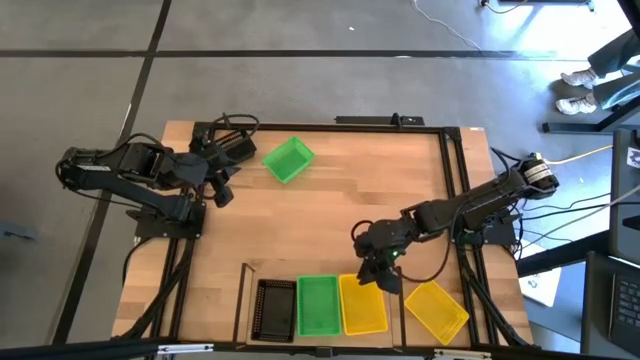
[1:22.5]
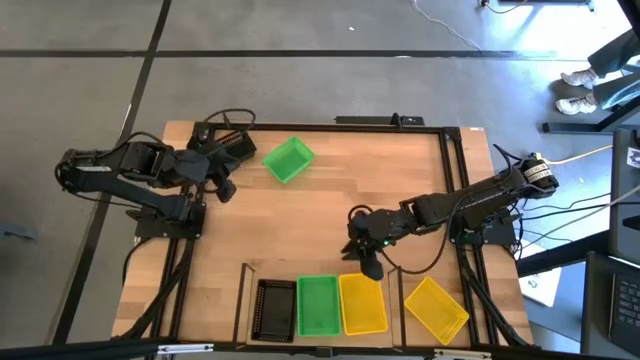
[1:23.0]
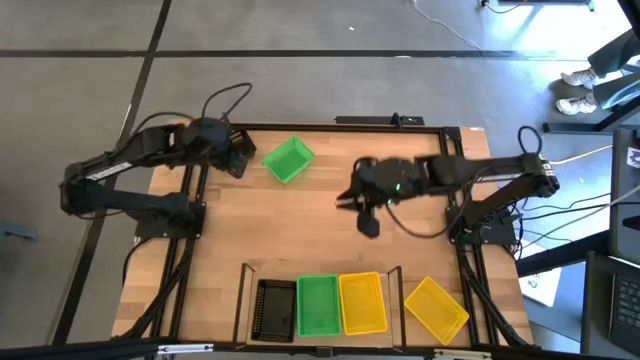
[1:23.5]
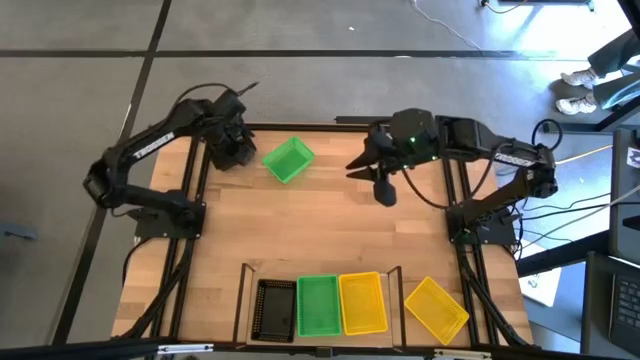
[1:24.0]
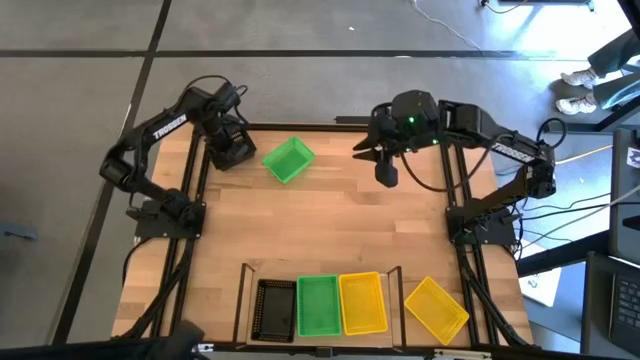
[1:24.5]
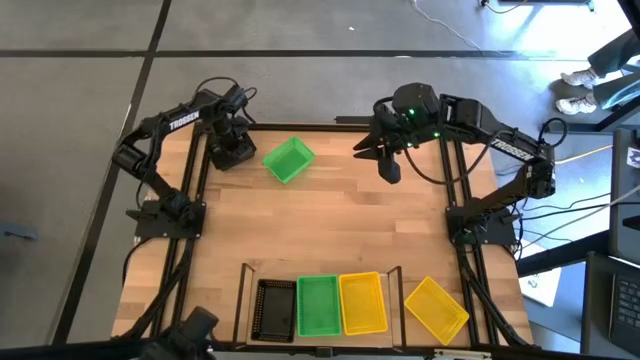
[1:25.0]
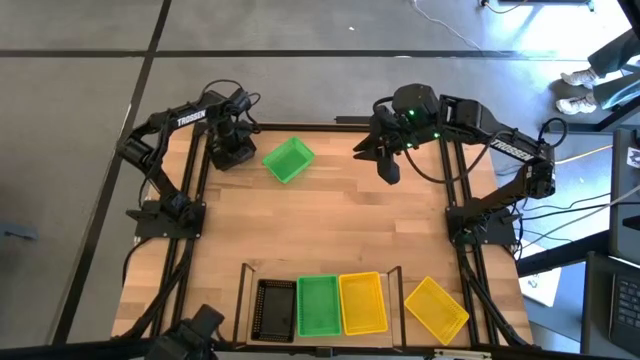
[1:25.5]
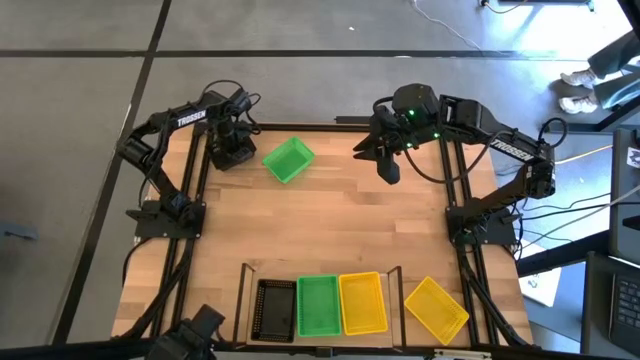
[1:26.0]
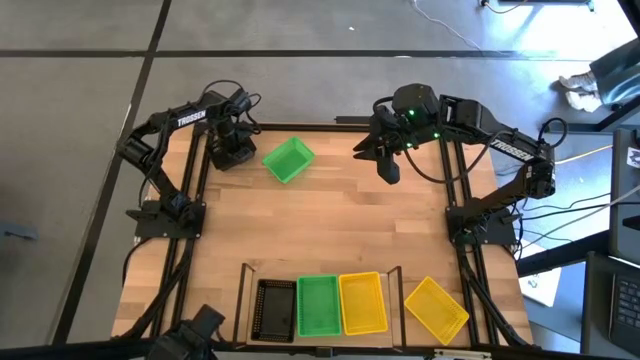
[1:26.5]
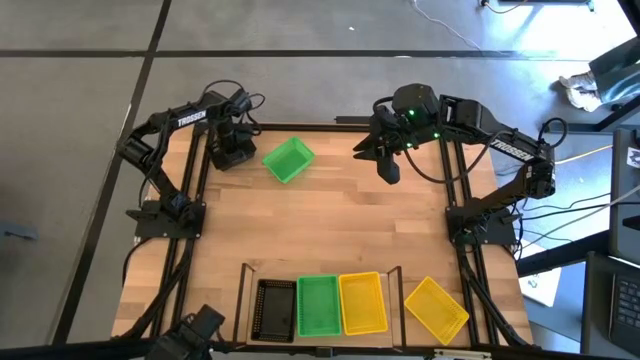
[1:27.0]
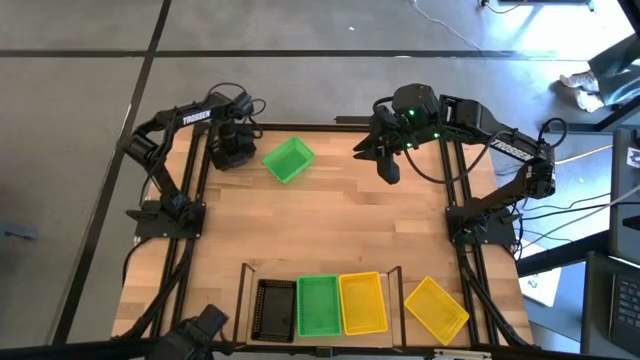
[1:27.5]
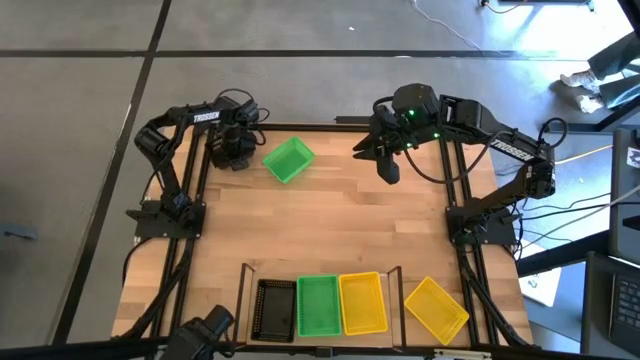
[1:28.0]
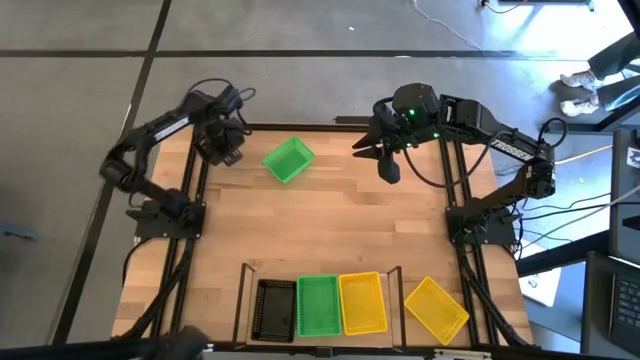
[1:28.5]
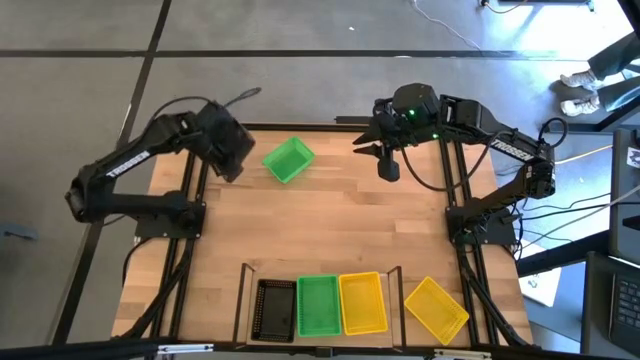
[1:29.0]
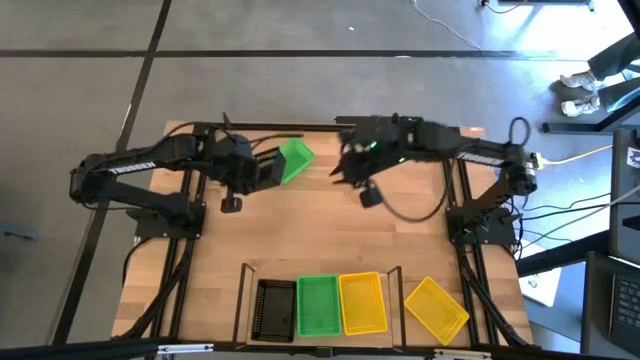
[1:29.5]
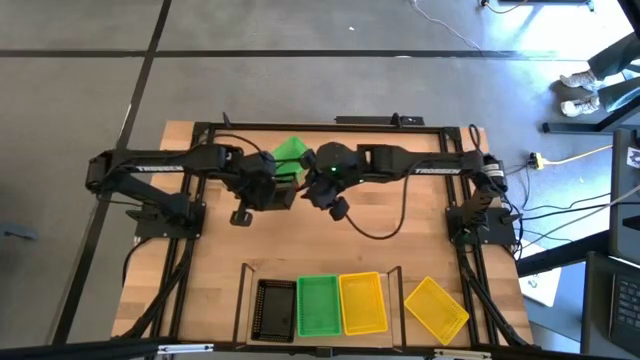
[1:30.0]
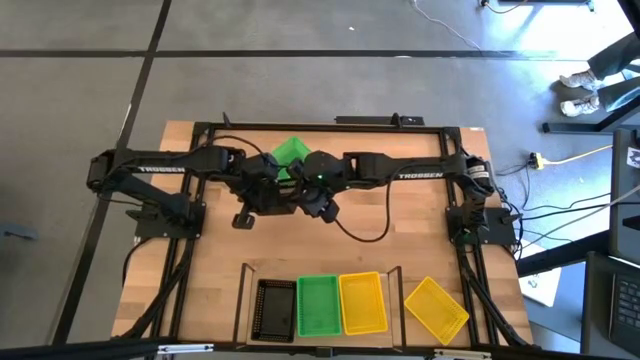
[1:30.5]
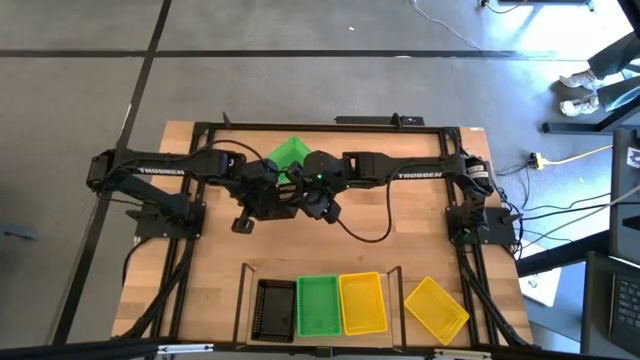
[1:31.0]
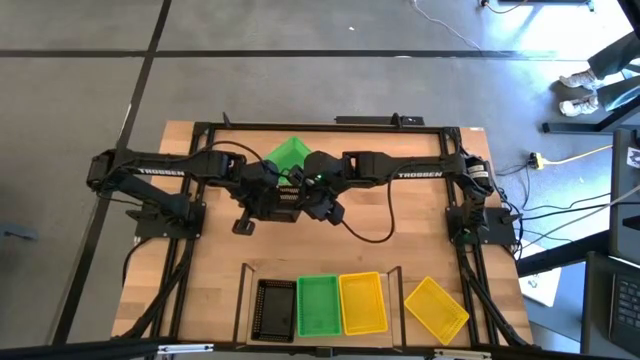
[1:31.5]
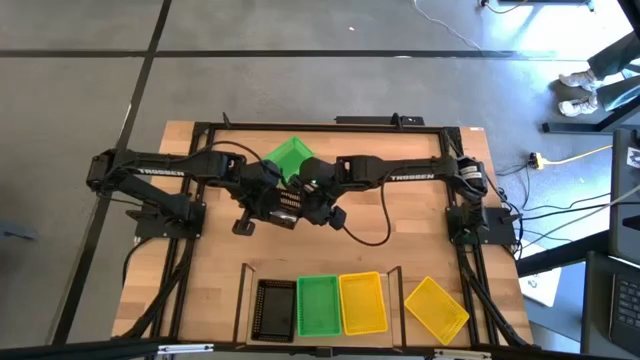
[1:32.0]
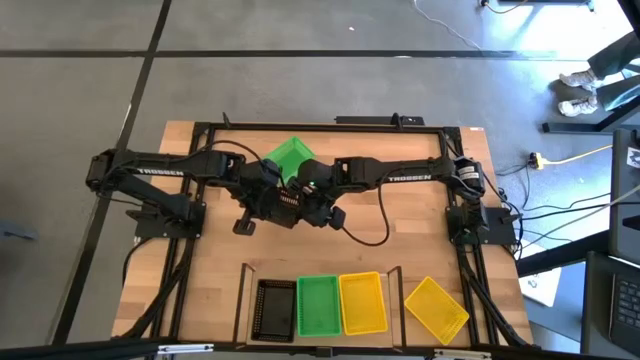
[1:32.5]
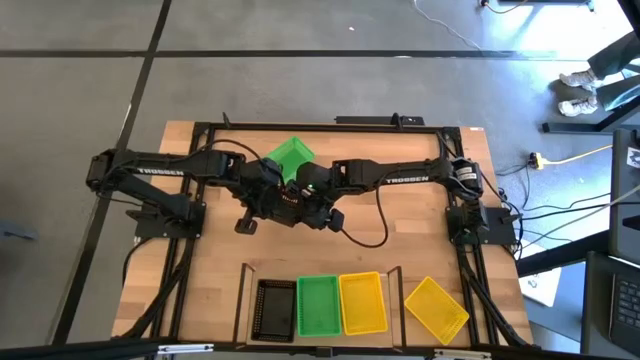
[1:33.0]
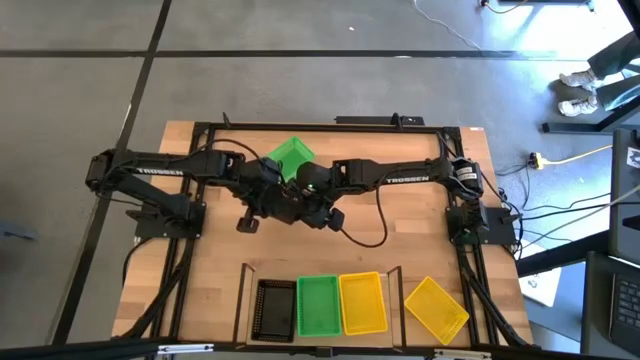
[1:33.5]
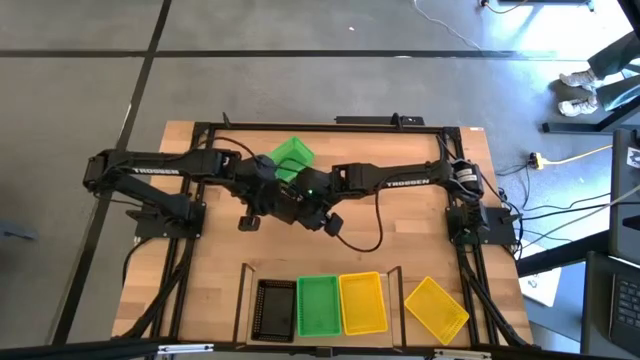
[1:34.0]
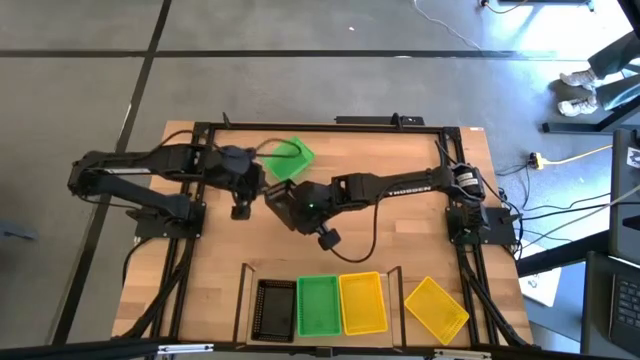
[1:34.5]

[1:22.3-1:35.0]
Task: Stack baskets on shelf by color
Stack the black basket on top of the black baskets on the shelf

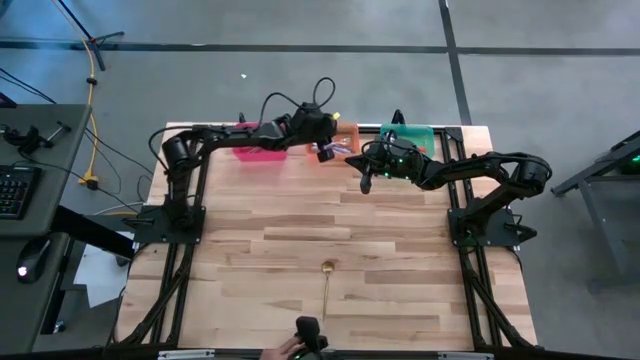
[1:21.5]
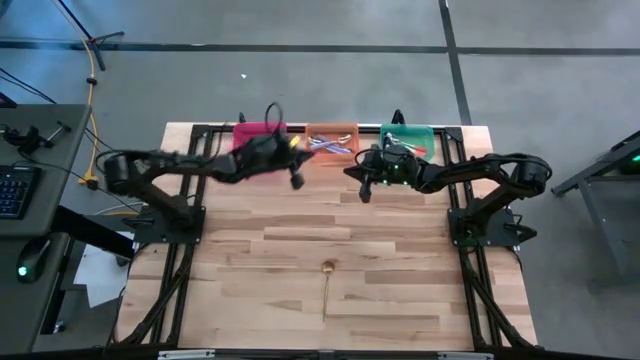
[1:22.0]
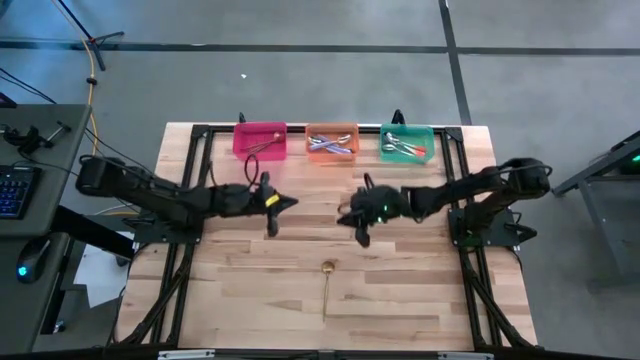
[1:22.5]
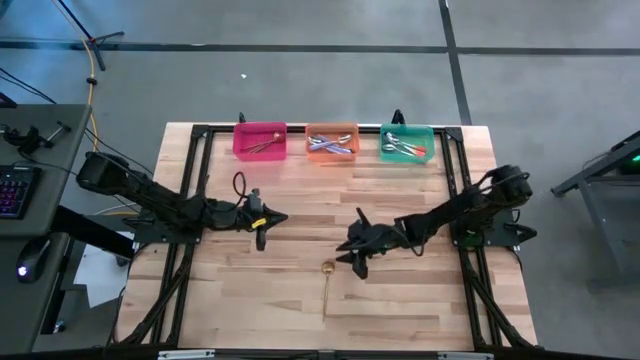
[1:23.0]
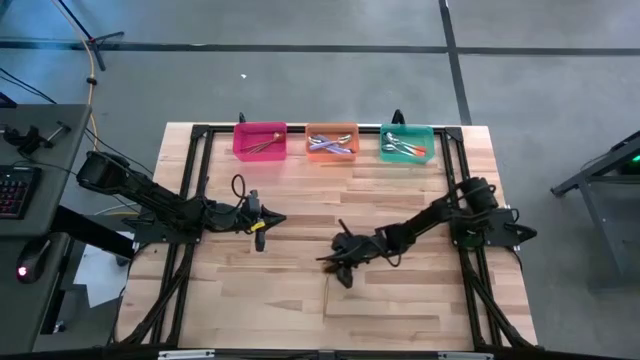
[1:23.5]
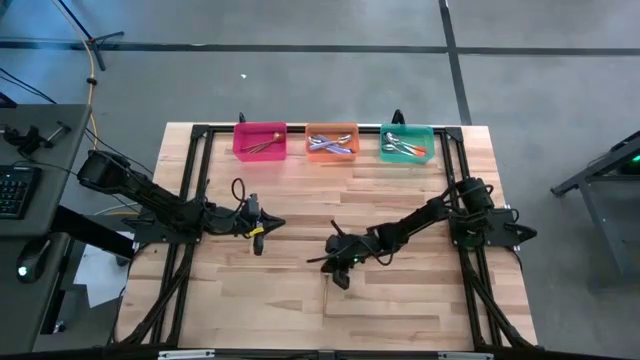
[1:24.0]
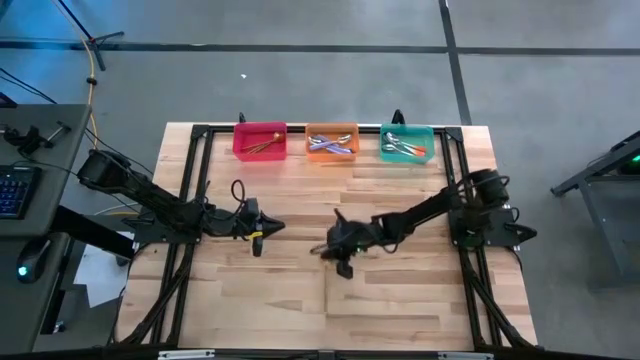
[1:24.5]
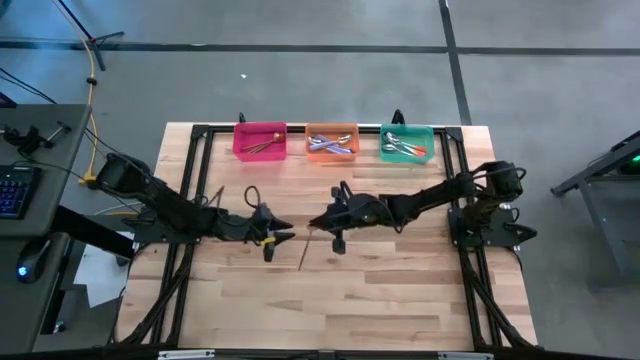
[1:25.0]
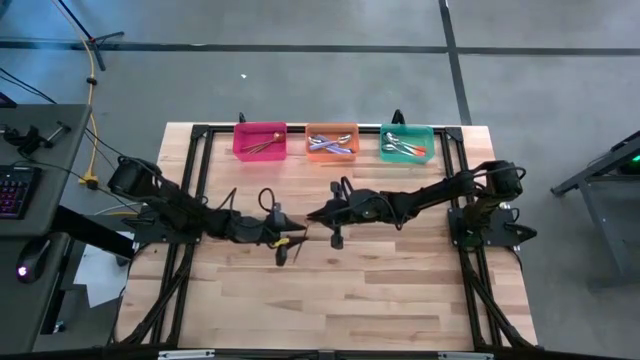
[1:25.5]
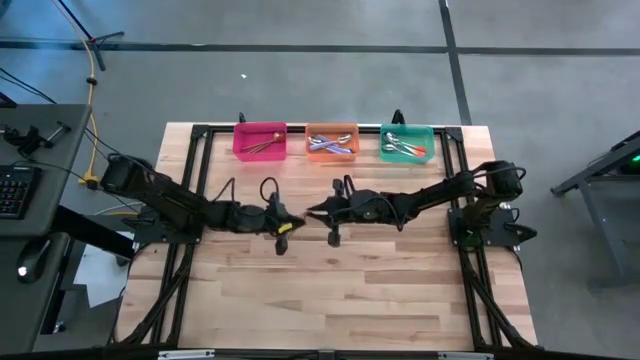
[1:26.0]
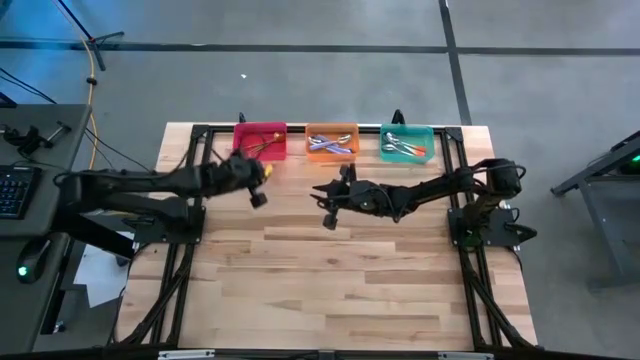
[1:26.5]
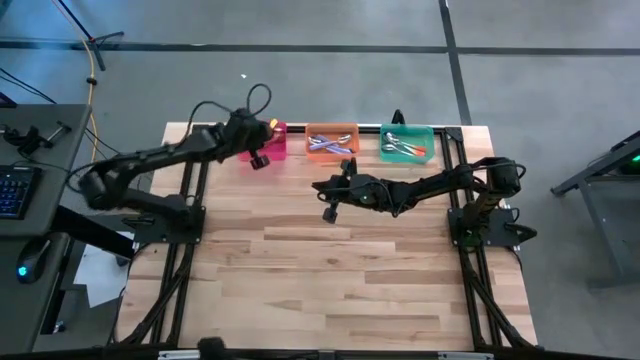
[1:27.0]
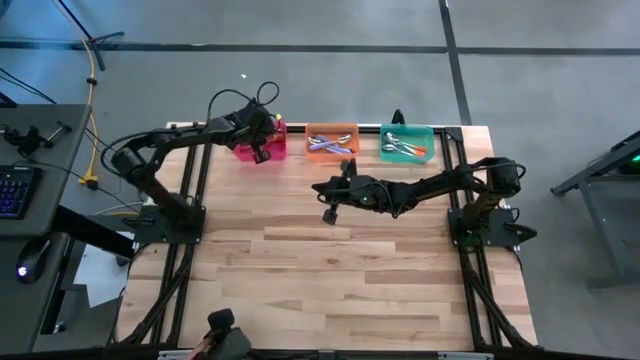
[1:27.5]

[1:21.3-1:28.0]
Task: Sort silverware by color (type)
Put the gold spoon into the pink bin

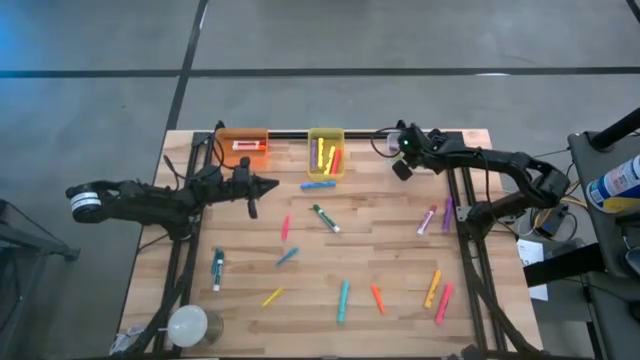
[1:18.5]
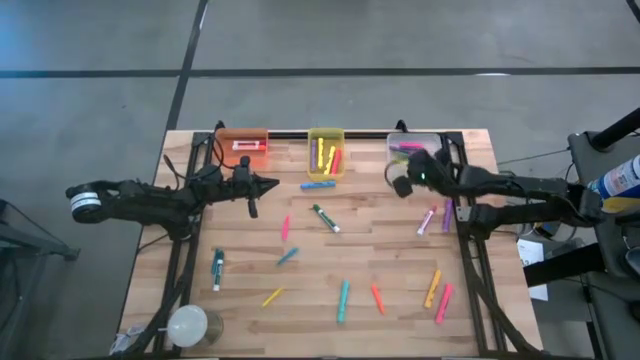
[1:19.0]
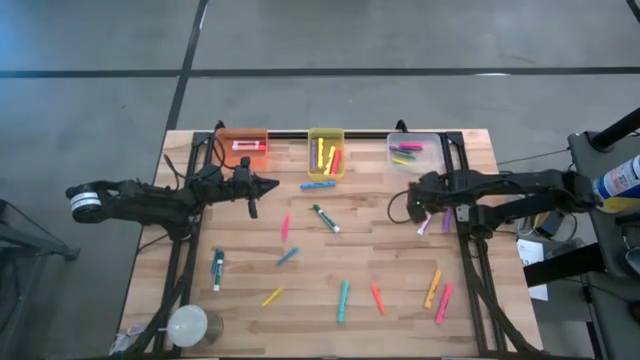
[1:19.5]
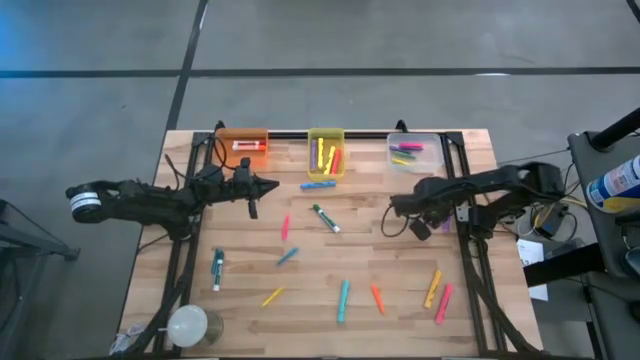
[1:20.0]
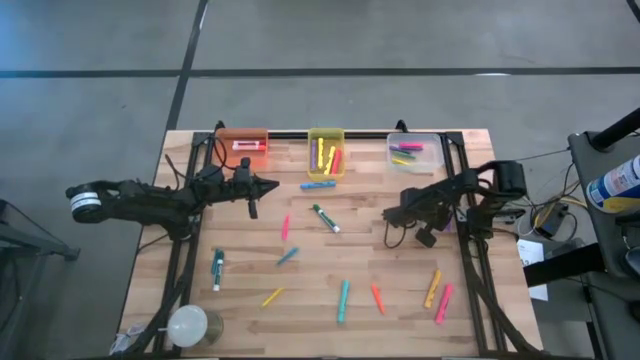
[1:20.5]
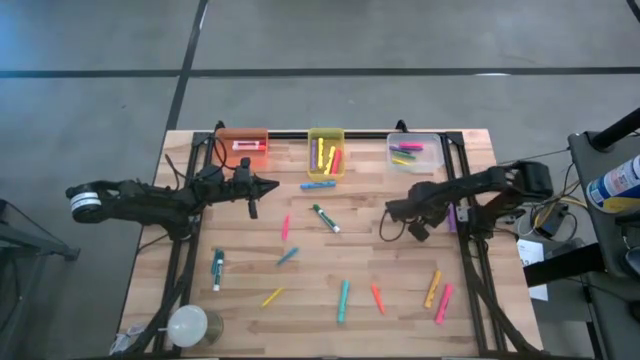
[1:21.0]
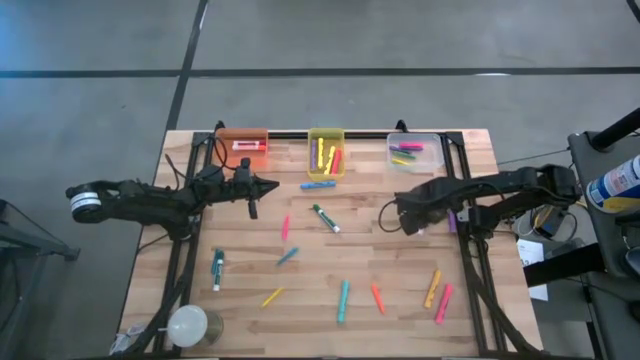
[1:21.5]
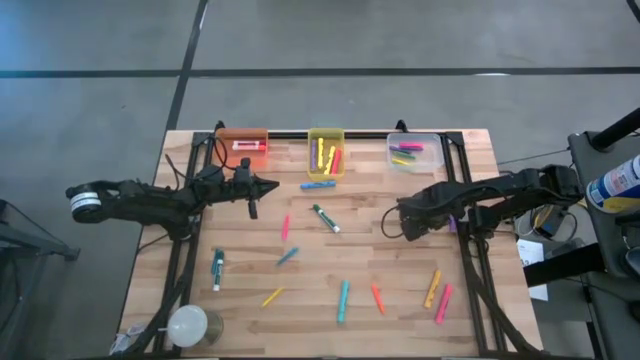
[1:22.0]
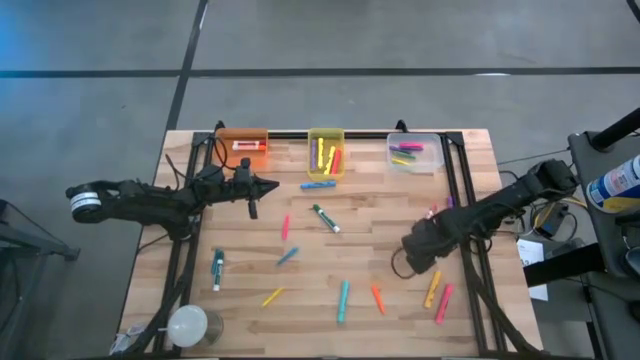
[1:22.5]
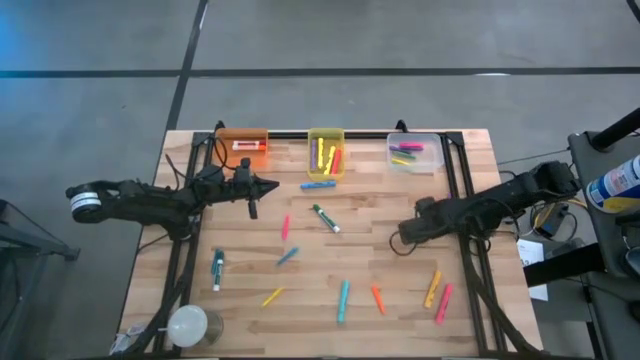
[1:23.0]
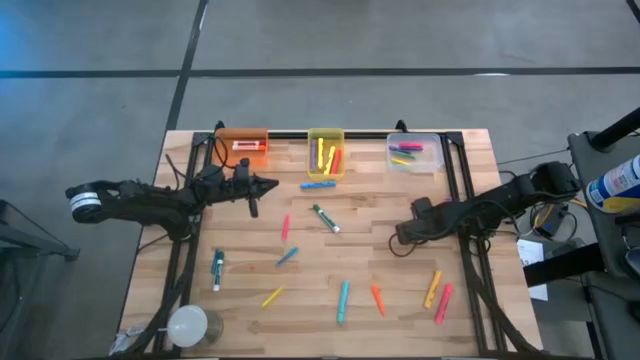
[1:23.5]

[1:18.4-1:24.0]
Task: Pick & Place Markers
Put the pink white marker pen into the orange bin
